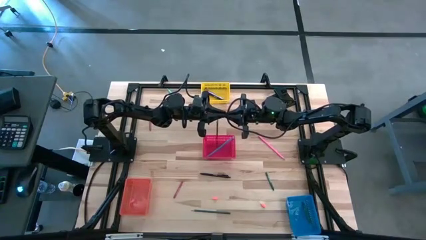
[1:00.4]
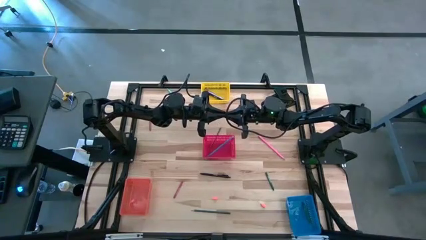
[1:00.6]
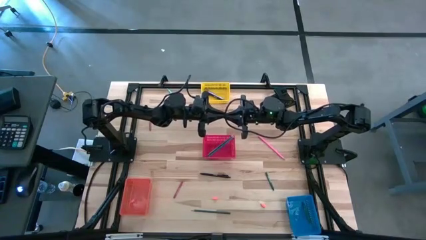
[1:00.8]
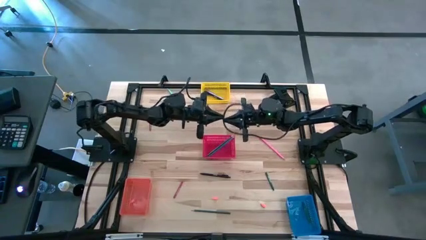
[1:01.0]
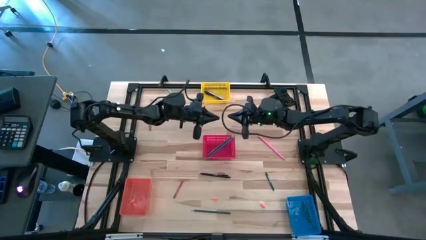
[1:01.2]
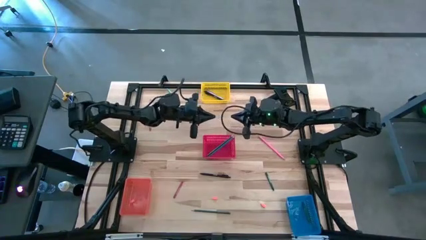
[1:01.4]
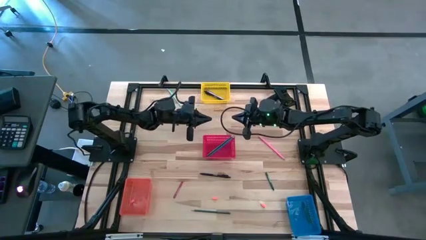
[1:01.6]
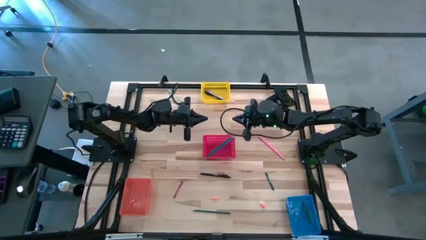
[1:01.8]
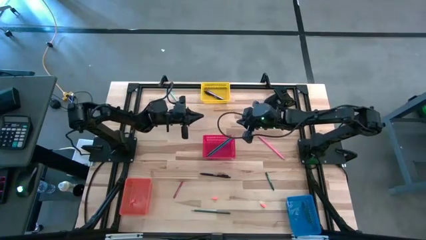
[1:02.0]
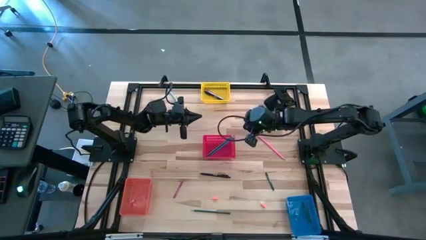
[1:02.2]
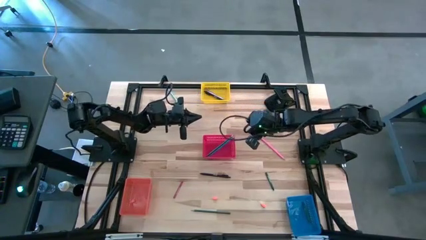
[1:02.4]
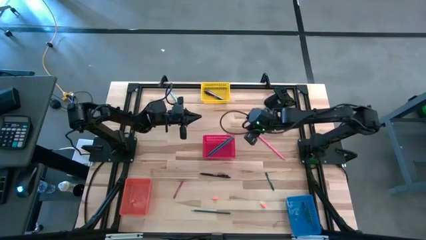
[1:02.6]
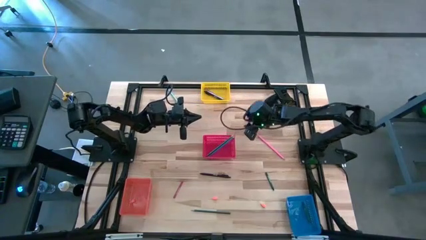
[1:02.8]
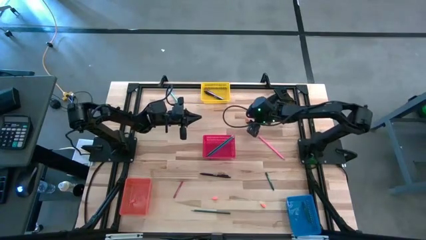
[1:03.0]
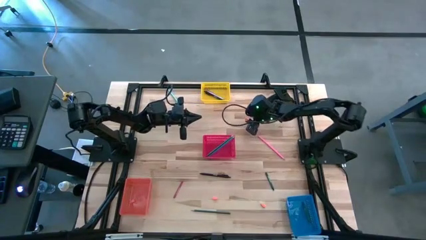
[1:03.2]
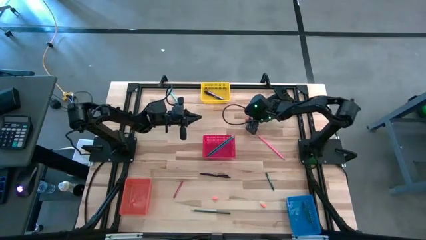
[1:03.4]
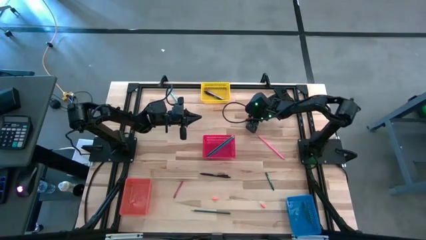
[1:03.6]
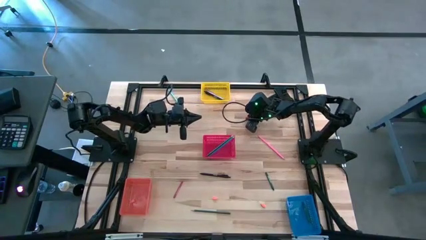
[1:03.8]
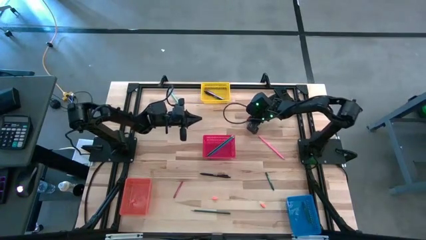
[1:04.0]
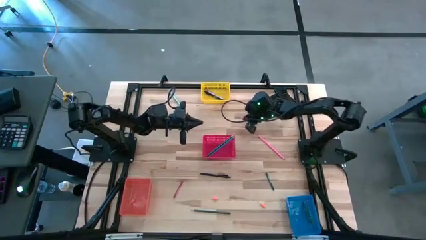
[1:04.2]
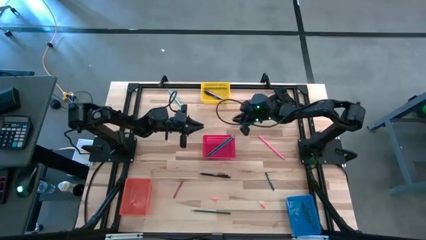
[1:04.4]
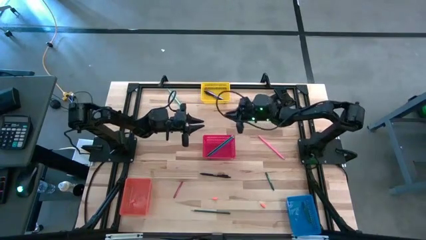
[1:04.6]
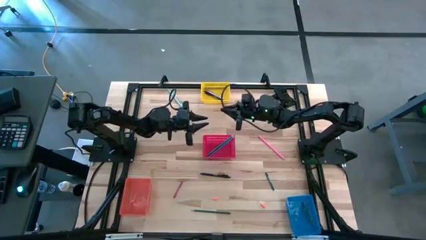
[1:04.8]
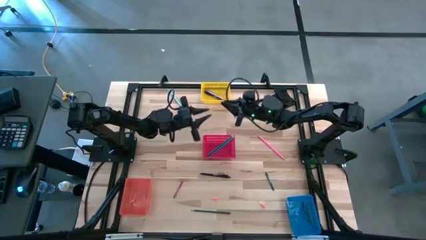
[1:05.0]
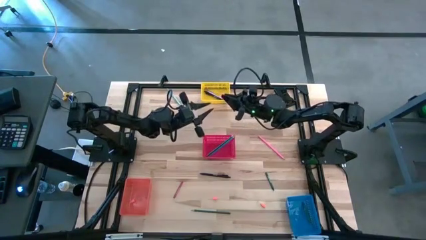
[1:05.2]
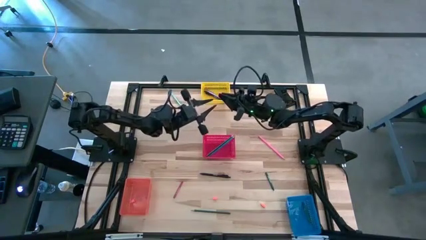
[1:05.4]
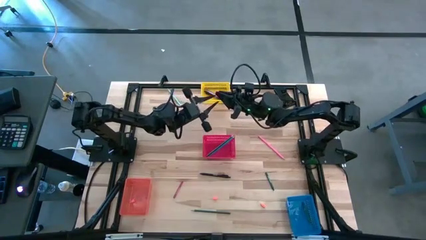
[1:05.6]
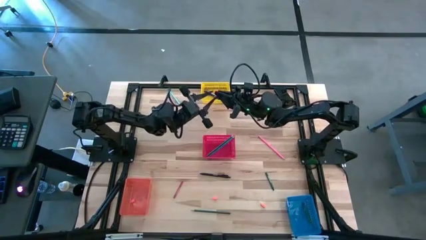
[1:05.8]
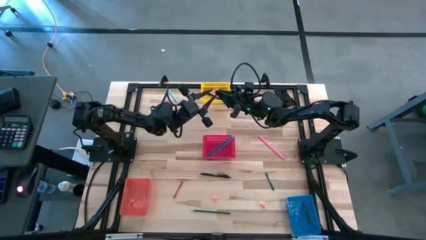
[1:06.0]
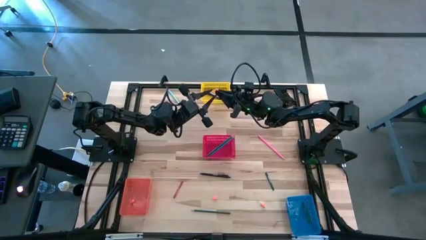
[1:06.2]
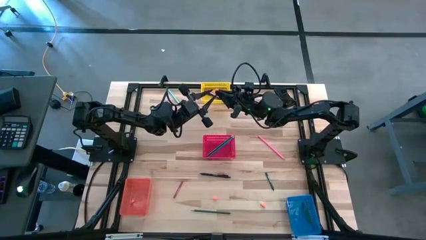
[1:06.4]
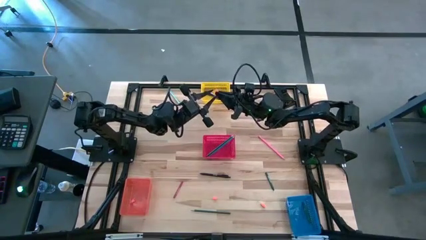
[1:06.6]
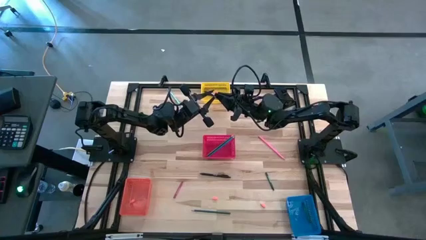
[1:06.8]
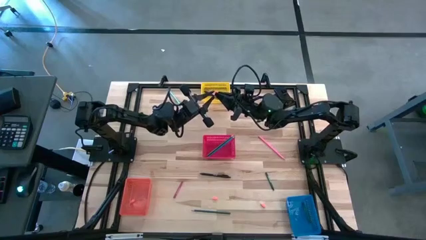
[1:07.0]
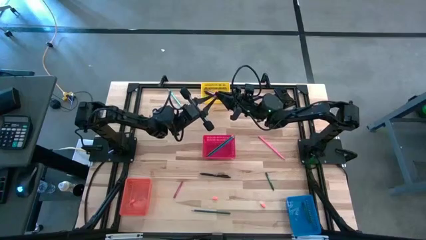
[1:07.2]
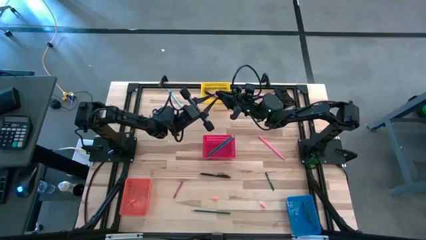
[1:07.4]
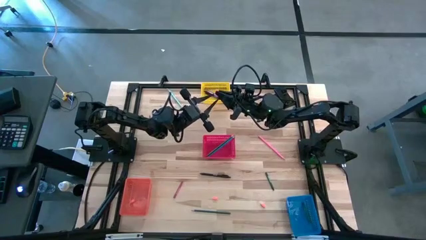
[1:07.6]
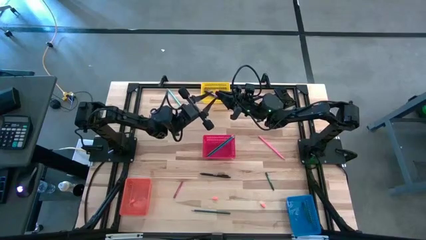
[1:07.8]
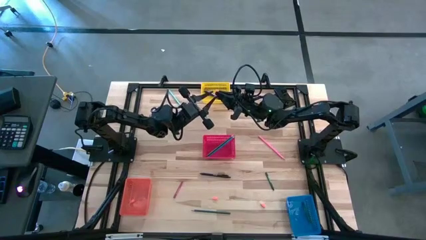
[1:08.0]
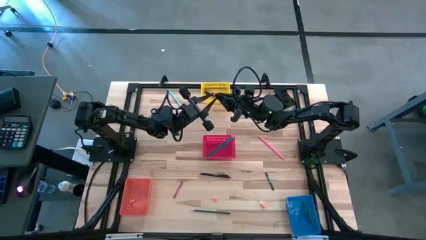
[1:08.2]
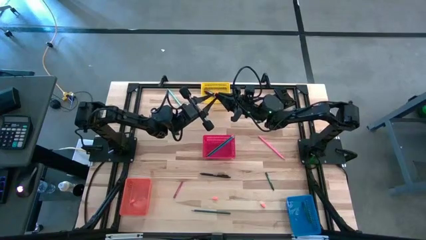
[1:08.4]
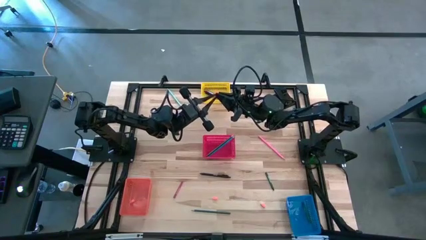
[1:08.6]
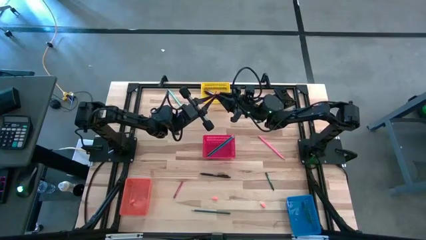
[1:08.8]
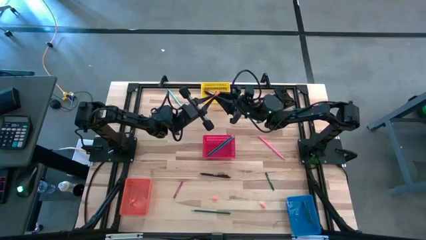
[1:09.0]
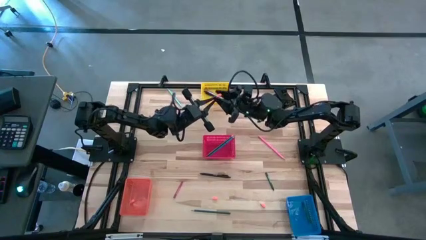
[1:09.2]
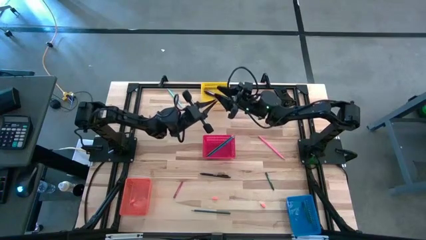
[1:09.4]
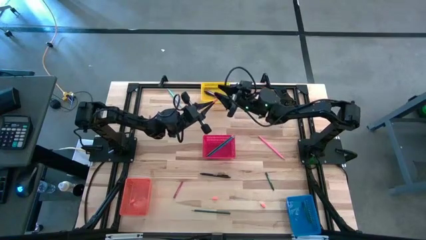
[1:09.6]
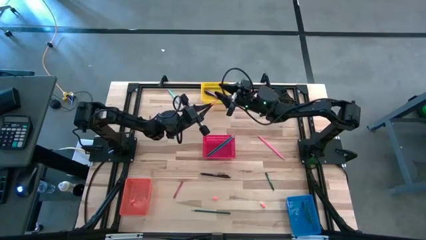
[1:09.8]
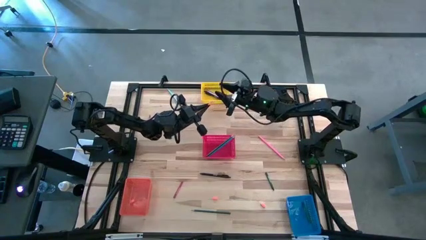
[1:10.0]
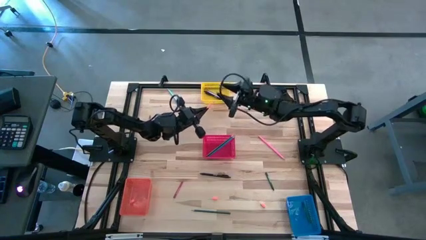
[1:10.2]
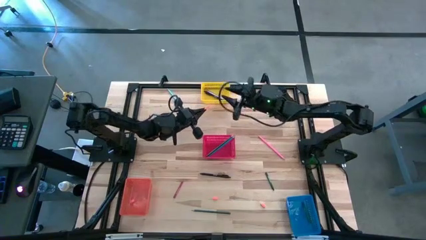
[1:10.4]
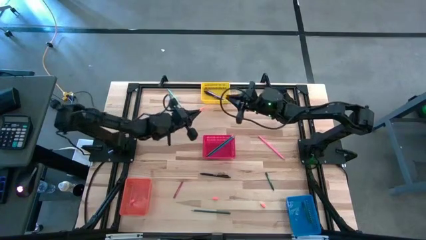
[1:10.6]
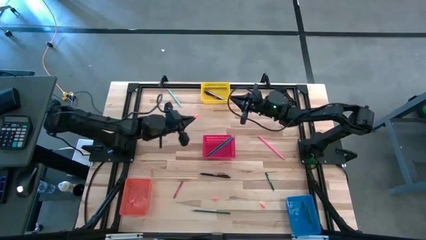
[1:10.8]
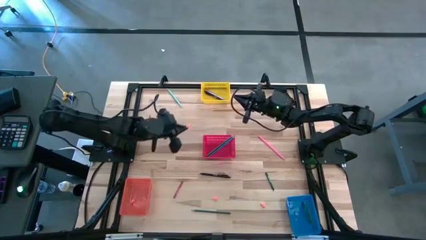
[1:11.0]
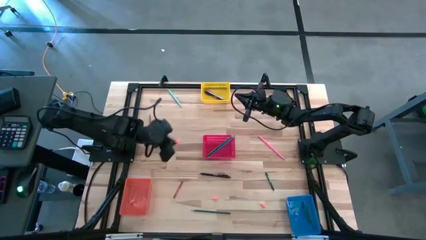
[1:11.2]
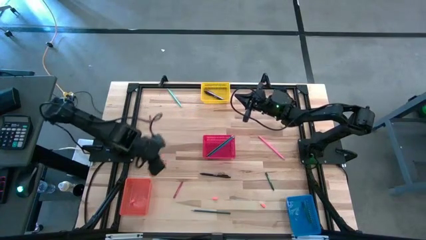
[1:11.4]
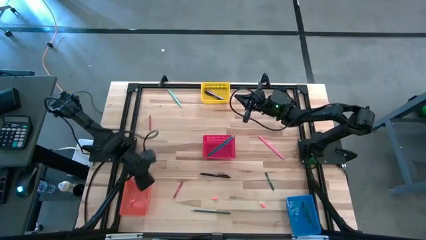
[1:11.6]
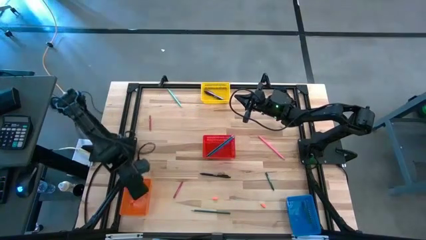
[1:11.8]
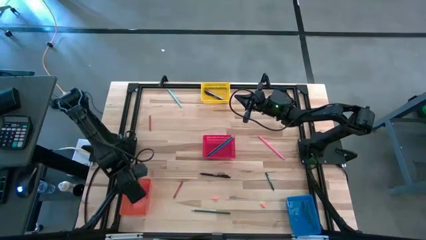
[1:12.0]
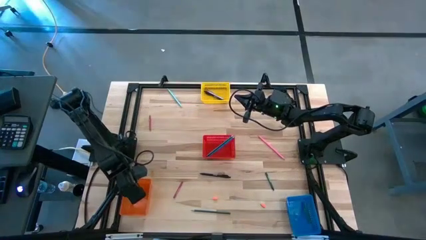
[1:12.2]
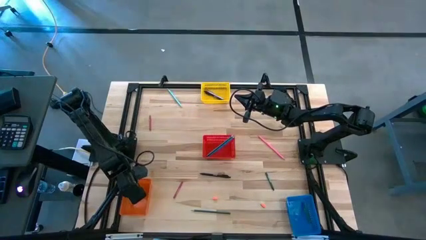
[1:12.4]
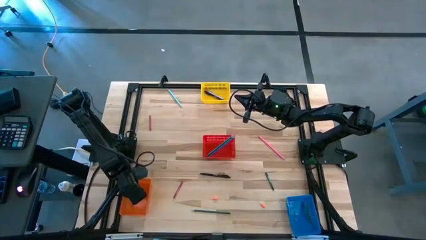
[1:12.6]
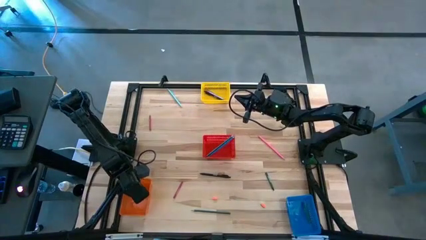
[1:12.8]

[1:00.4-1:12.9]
Task: Sort crayons/erasers/pens/pencils in bins
Put the orange eraser into the orange bin

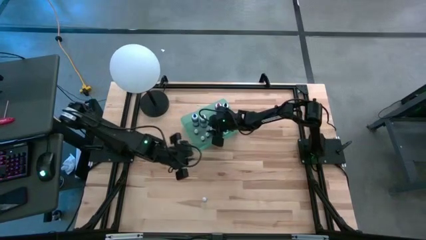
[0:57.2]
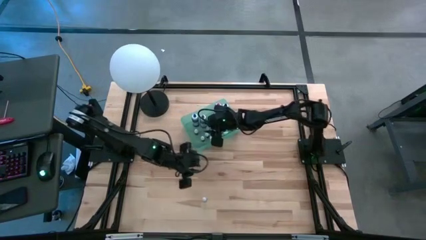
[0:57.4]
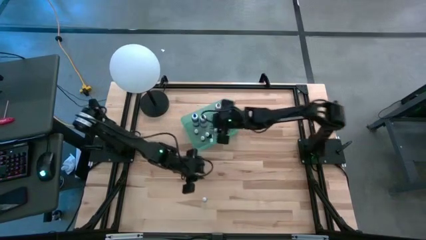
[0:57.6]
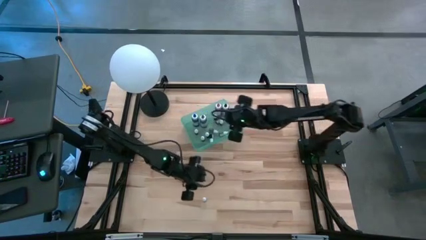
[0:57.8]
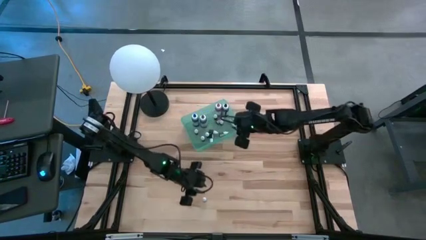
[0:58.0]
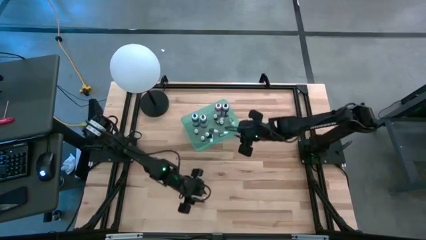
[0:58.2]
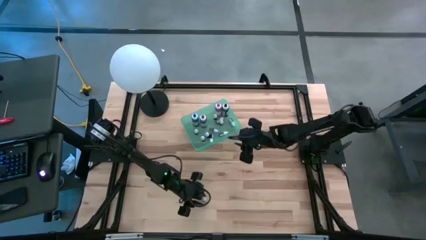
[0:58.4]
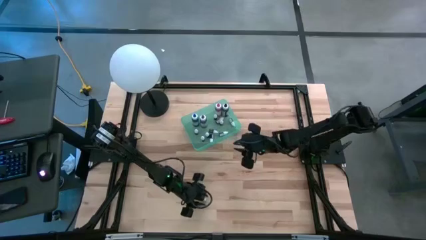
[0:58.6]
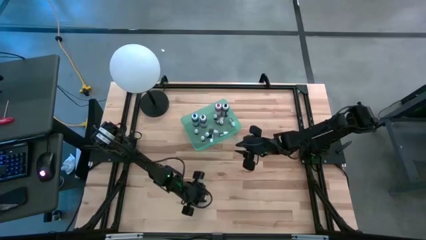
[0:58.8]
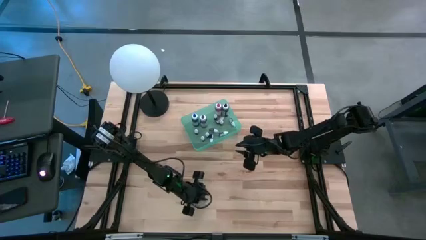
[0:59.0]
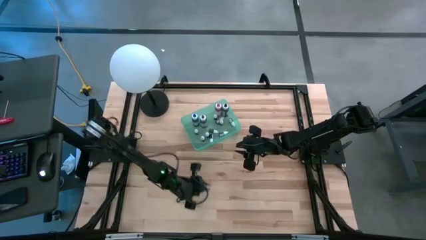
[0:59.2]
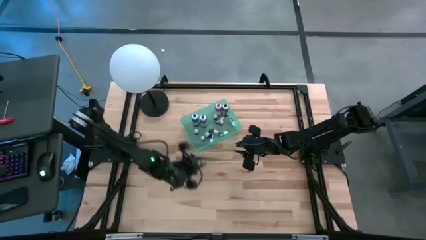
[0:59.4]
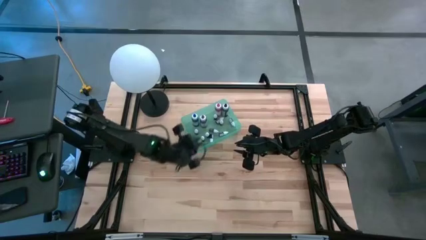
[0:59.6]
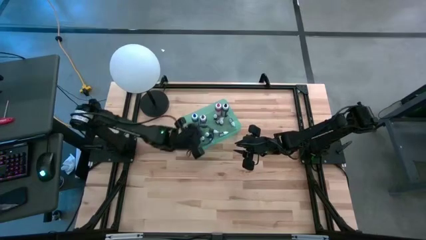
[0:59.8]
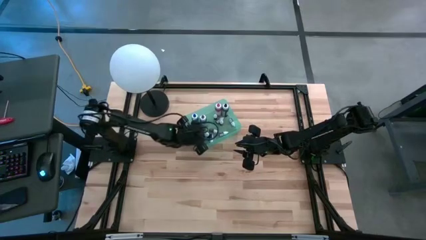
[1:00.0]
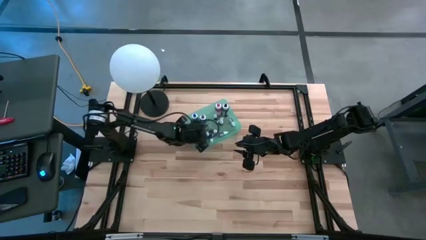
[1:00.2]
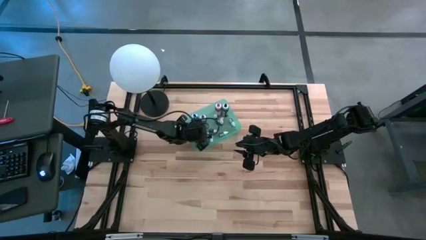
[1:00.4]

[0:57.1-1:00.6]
Task: Pick & Place food coloring
Put the small blue bottle into the blue bin
